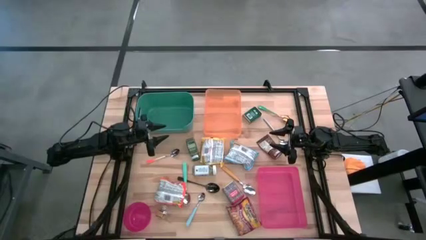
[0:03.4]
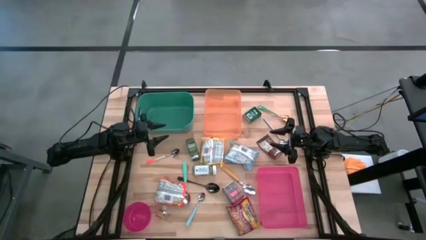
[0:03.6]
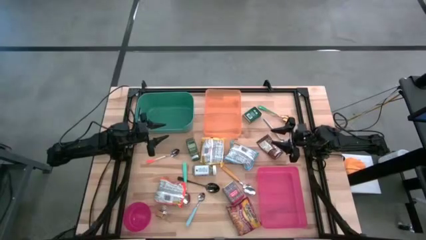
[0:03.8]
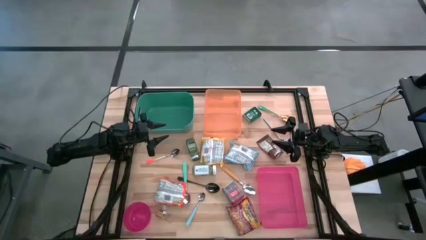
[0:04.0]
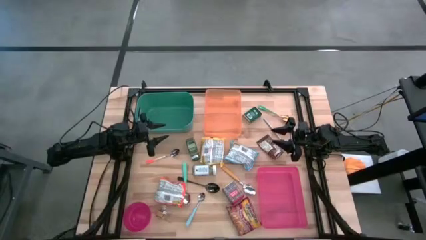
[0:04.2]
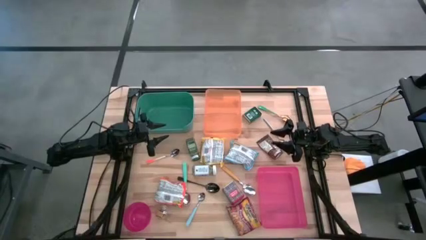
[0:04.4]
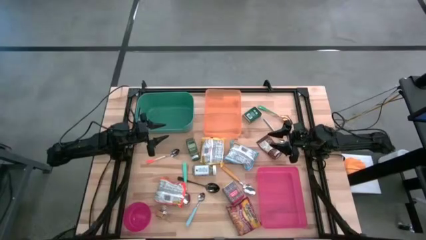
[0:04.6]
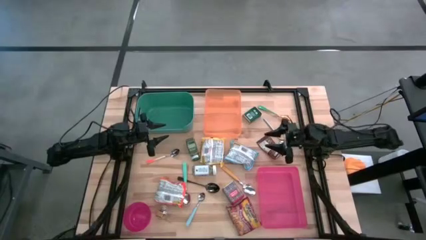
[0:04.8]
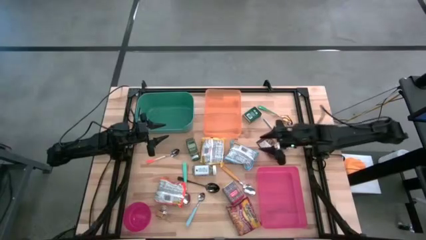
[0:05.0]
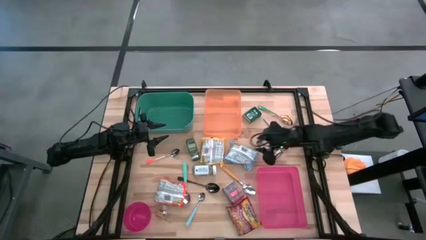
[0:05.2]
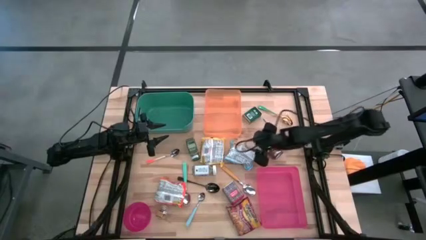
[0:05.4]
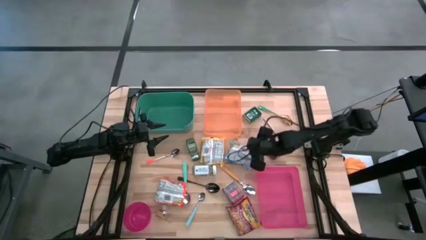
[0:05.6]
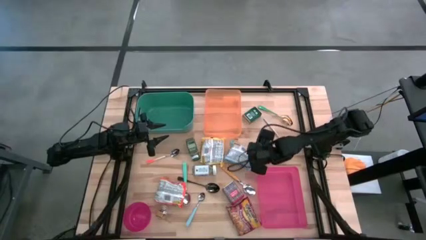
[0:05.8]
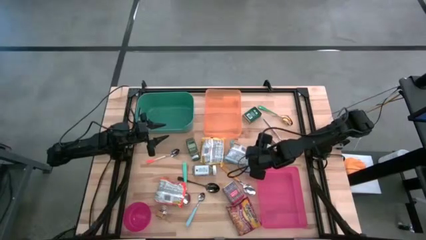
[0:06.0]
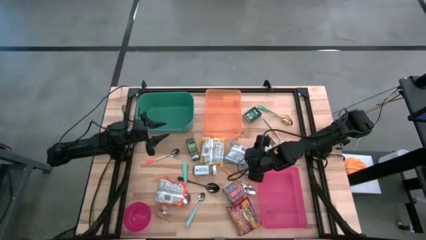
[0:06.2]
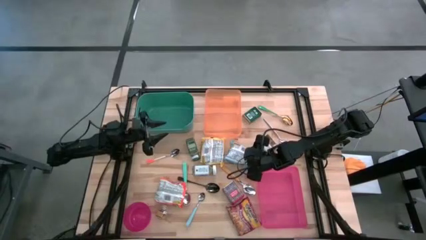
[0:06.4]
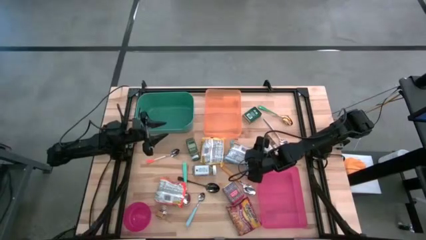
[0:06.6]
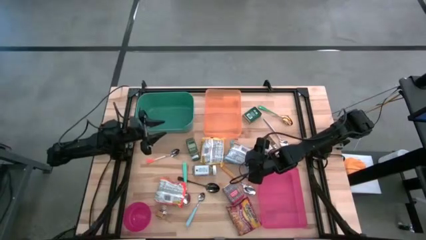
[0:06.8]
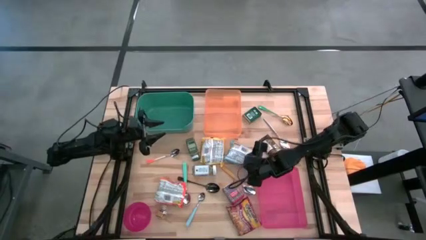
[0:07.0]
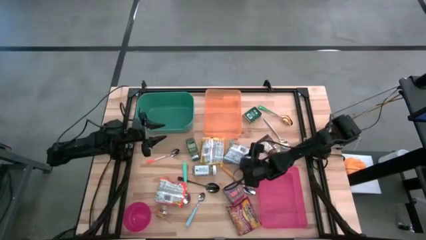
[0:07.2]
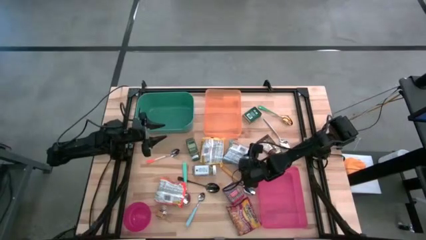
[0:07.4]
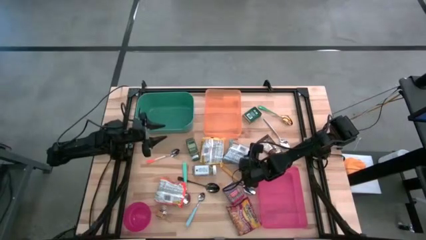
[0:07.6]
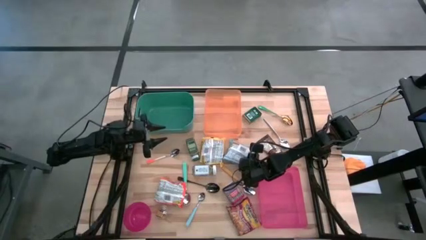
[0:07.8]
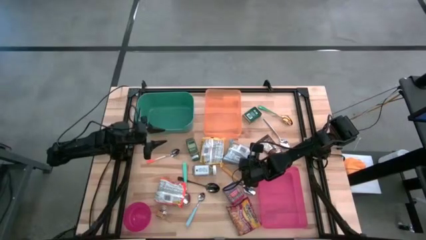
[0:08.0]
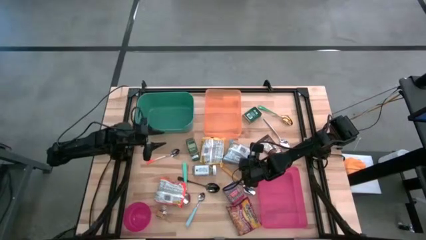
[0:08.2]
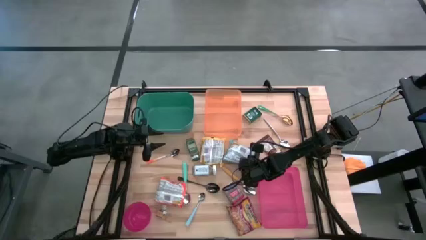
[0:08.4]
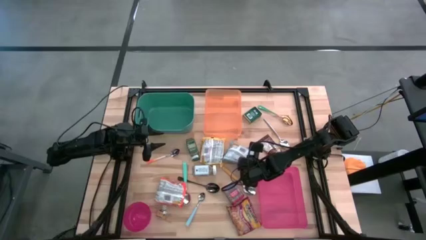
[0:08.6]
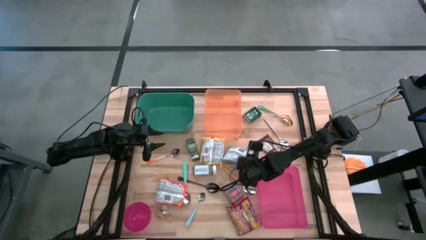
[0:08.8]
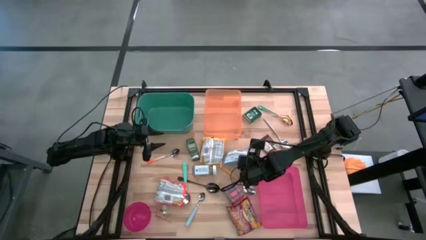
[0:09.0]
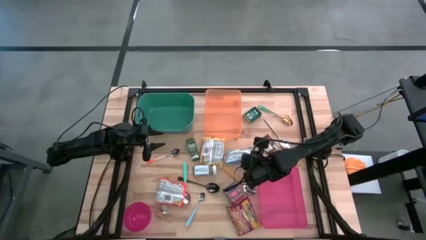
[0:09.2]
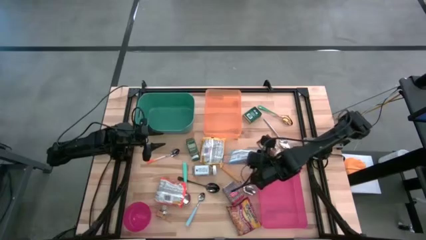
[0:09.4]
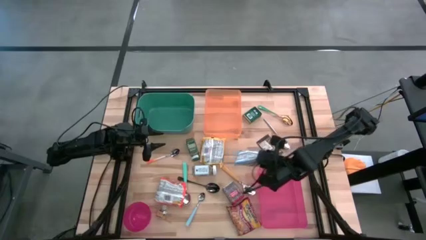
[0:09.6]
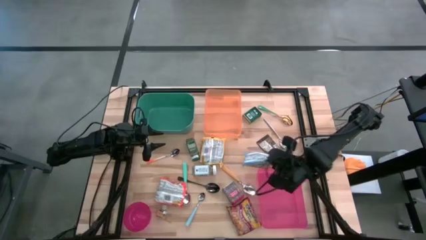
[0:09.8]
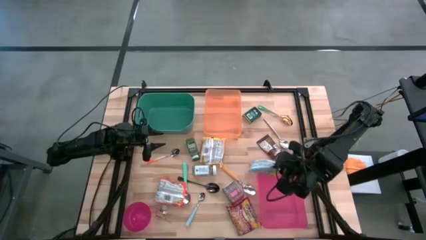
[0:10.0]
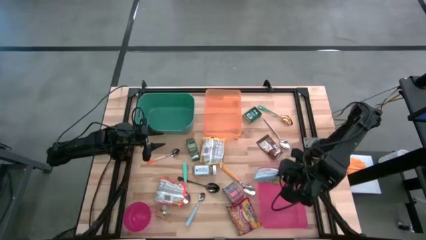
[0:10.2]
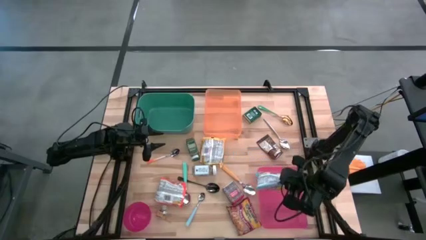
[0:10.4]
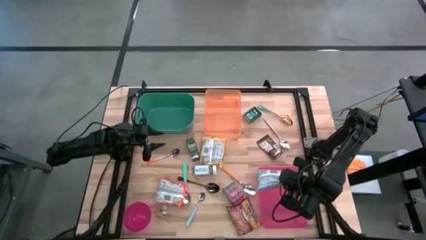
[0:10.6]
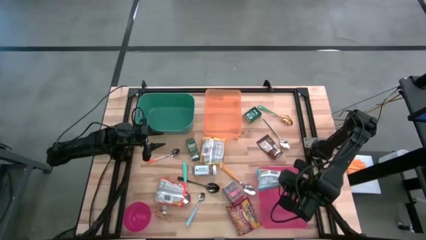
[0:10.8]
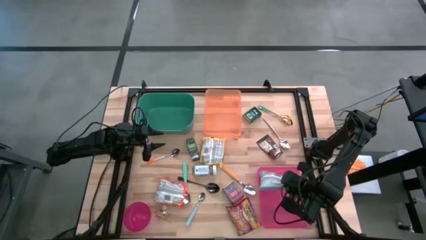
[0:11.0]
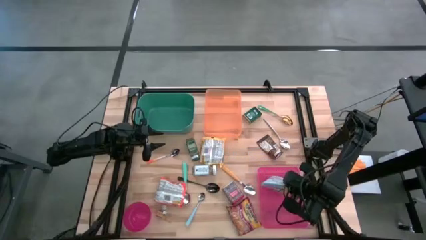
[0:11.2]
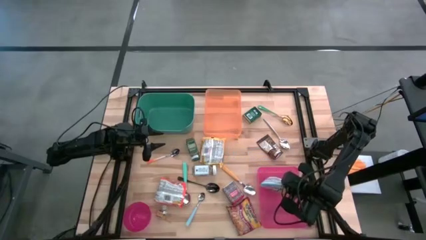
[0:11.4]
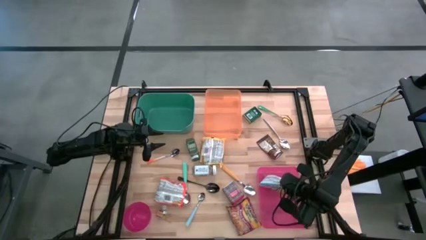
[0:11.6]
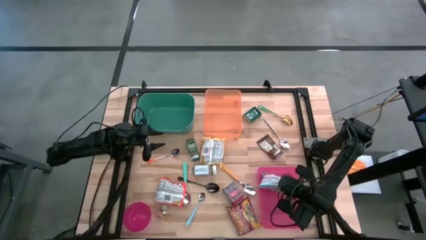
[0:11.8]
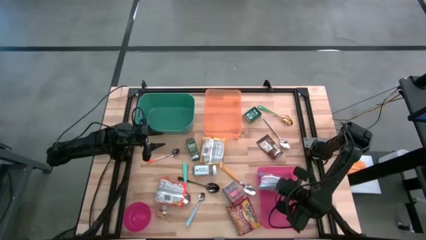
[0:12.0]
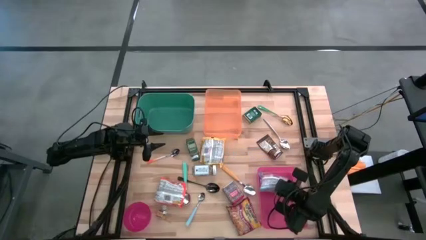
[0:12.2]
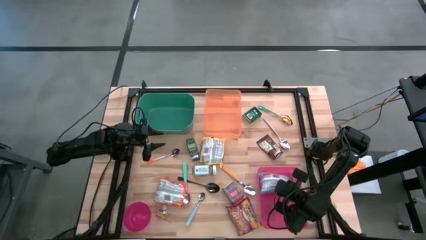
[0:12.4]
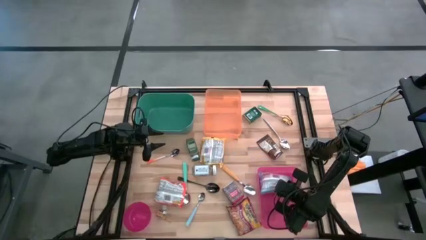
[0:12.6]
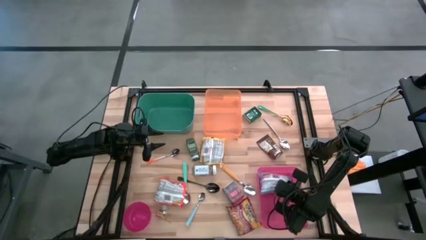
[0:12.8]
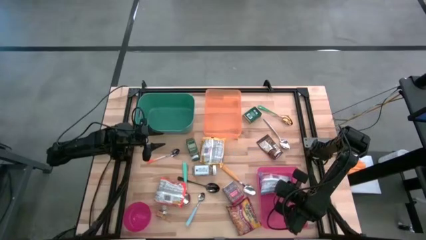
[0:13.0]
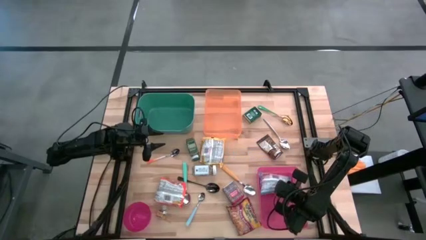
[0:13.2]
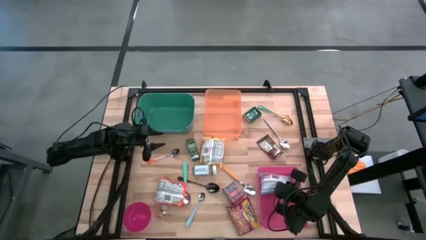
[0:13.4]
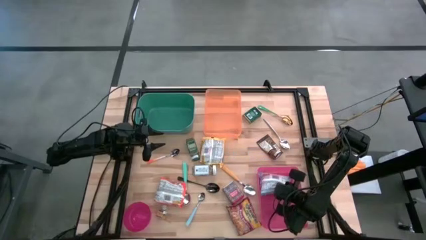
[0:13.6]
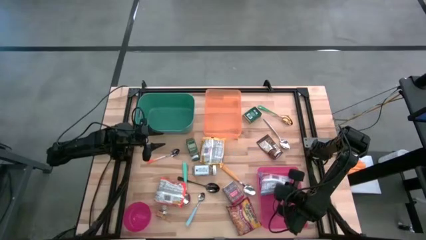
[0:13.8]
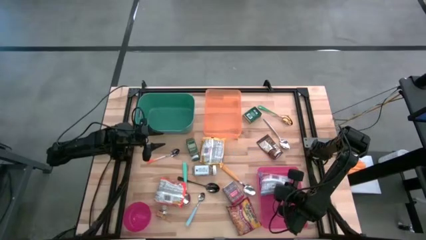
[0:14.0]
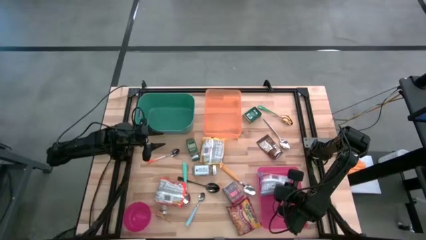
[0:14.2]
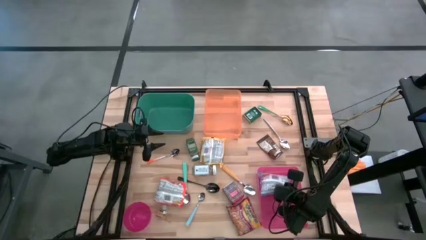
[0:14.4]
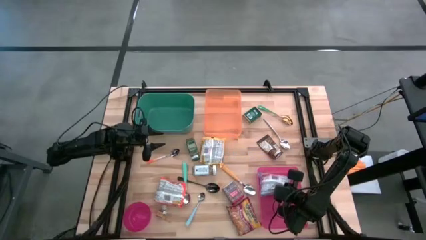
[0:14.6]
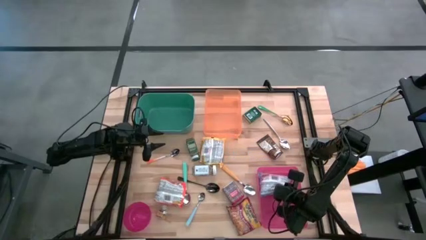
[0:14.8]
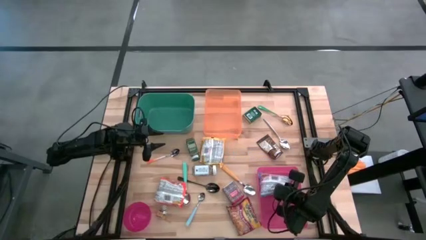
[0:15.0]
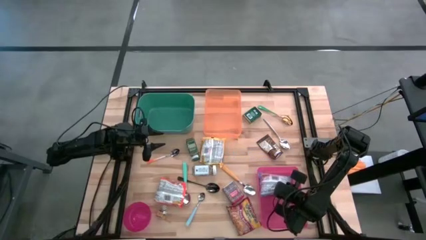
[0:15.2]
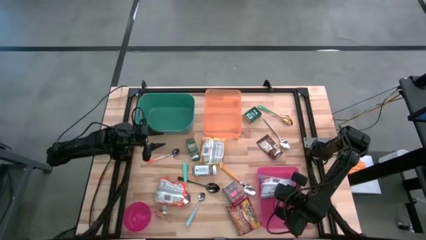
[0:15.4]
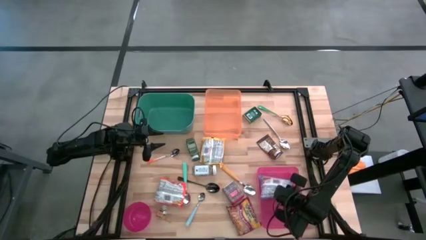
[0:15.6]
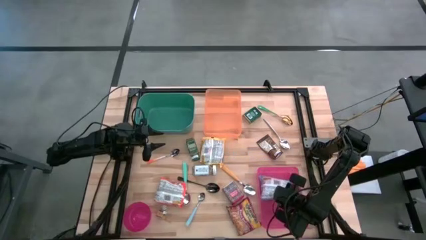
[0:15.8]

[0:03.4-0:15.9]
Put the blue noodle pack into the pink bin

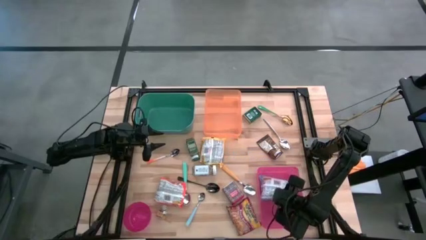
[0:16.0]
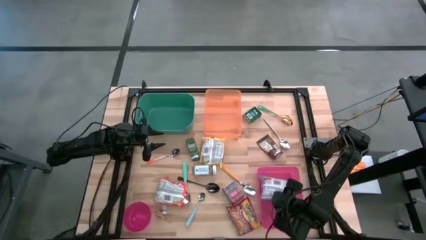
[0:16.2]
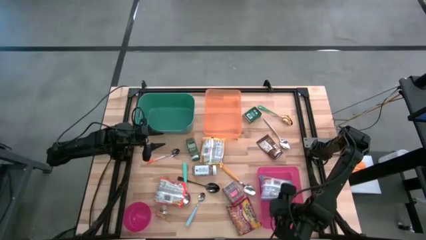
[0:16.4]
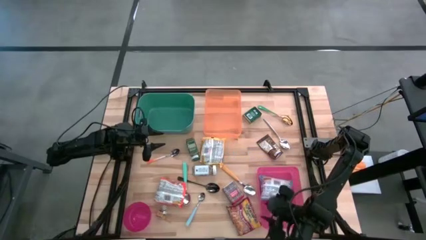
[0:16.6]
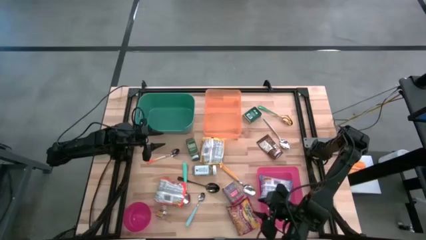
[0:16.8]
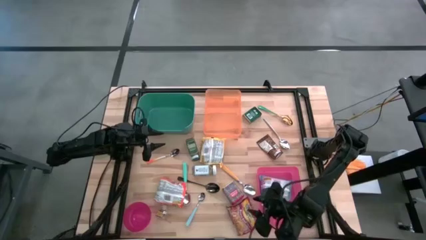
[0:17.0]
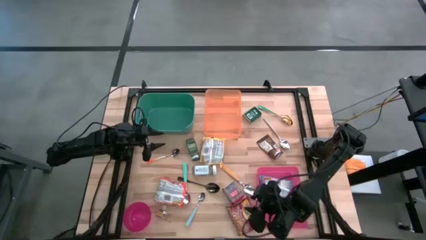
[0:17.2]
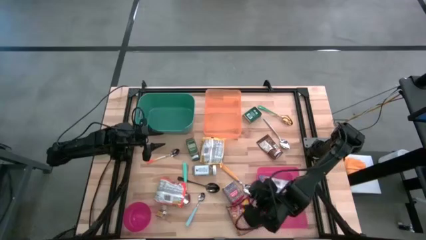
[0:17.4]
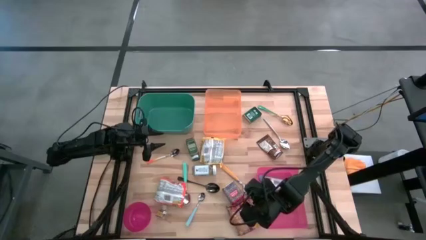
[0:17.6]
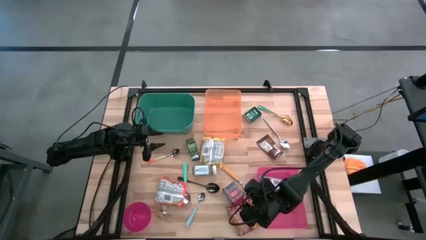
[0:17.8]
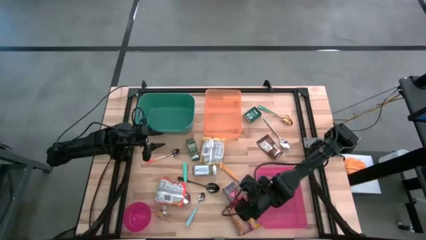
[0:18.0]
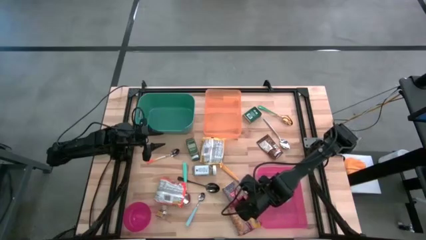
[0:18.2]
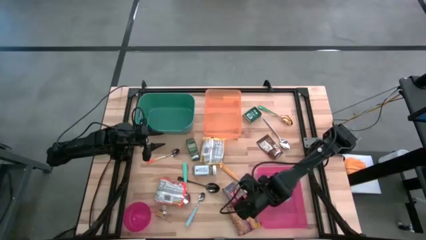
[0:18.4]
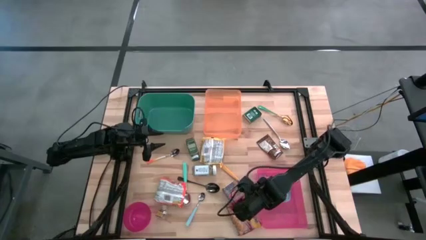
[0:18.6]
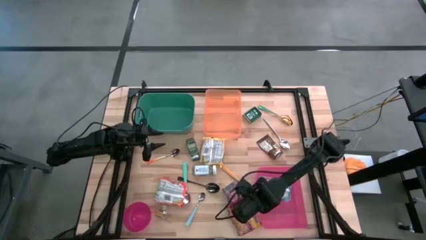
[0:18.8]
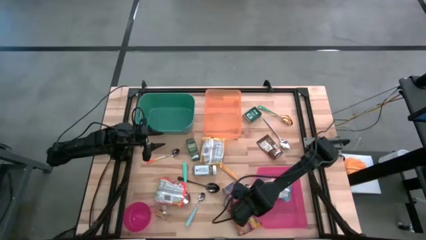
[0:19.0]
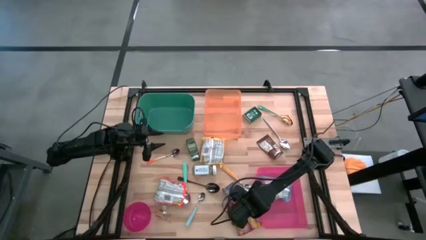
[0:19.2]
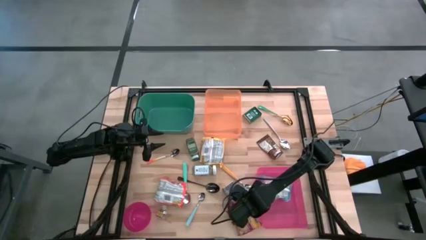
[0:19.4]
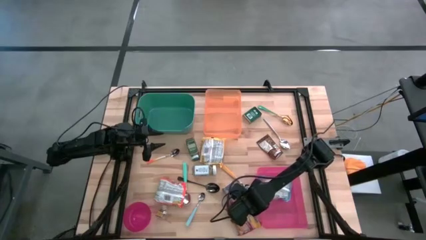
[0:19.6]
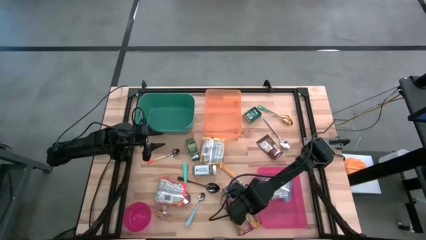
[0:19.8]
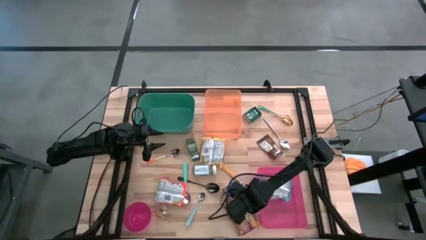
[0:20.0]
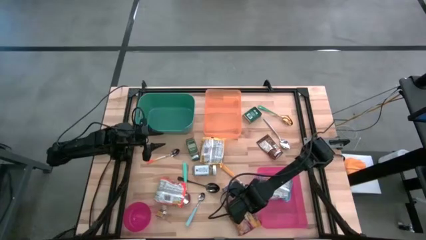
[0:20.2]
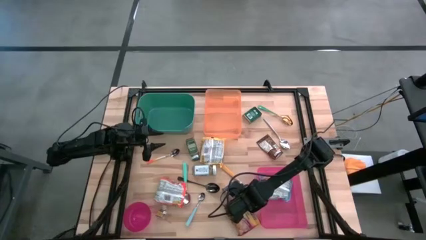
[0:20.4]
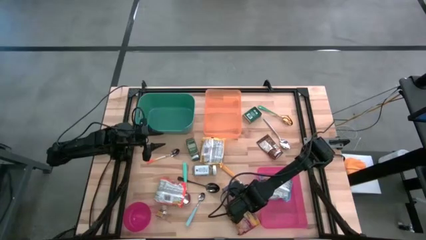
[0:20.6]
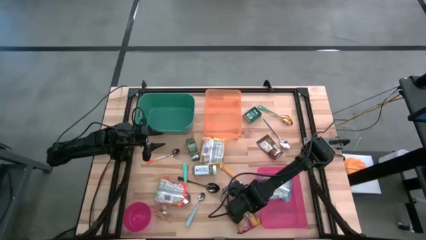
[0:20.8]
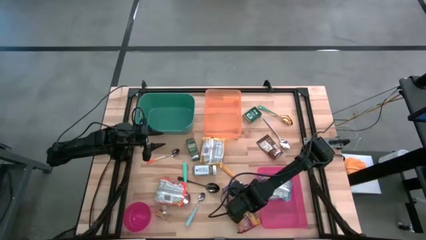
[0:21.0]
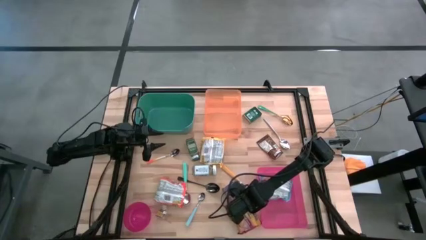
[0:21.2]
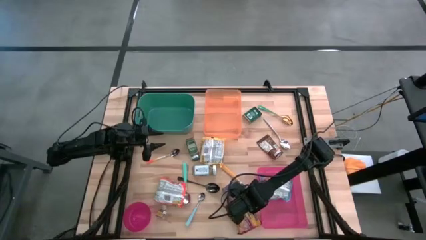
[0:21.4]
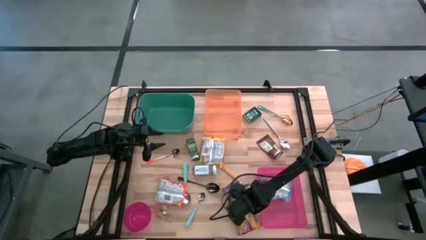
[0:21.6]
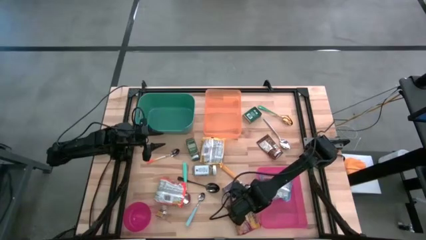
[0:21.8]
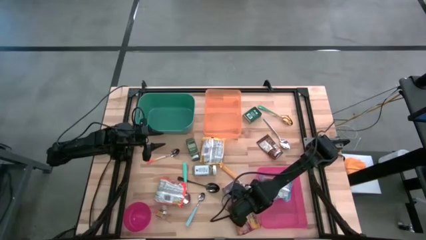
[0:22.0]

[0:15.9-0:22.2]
Put the red noodle pack into the pink bin
